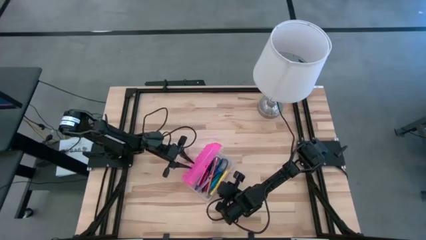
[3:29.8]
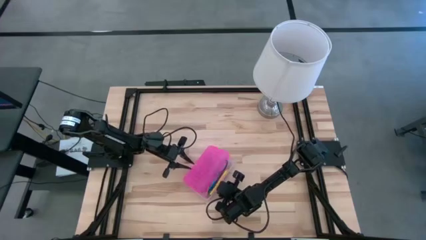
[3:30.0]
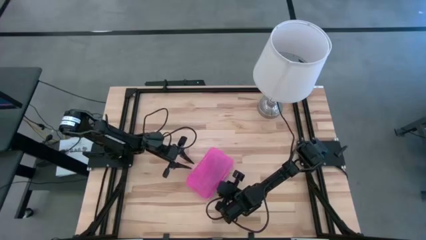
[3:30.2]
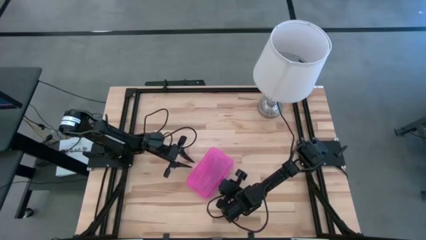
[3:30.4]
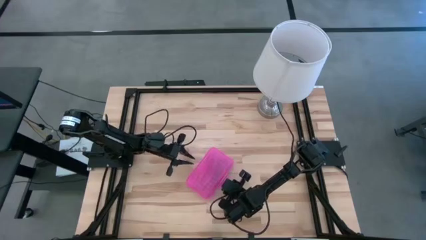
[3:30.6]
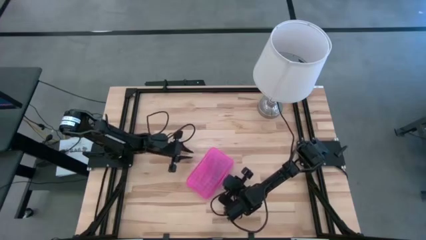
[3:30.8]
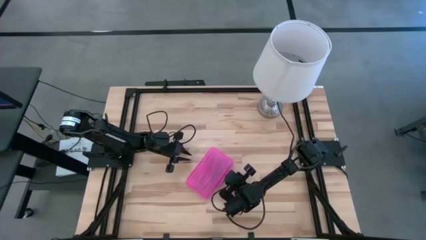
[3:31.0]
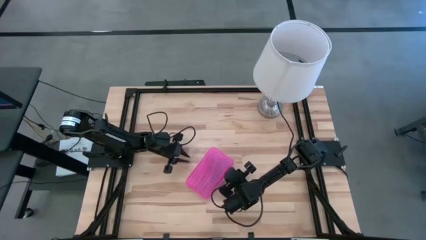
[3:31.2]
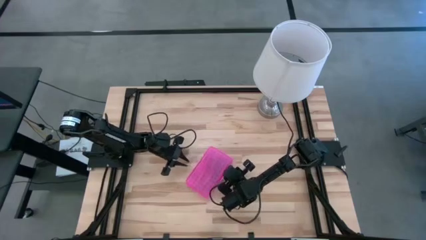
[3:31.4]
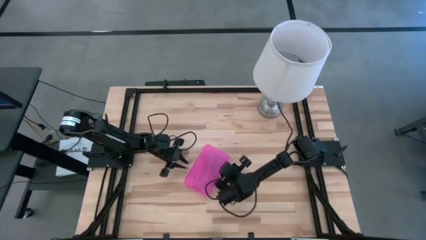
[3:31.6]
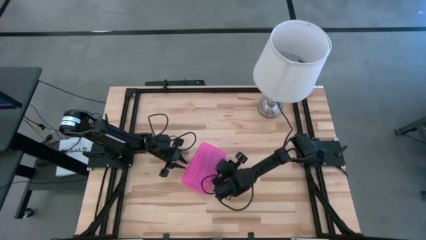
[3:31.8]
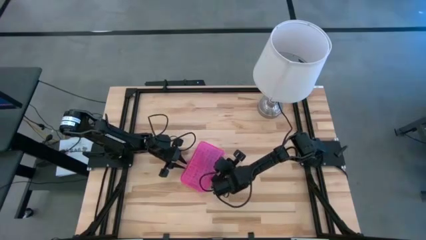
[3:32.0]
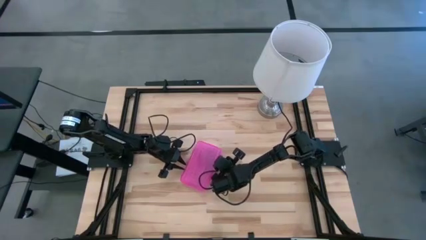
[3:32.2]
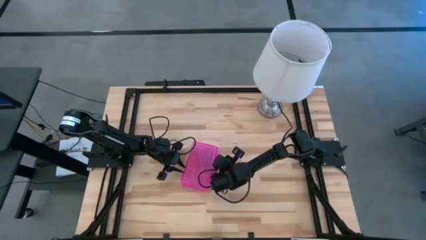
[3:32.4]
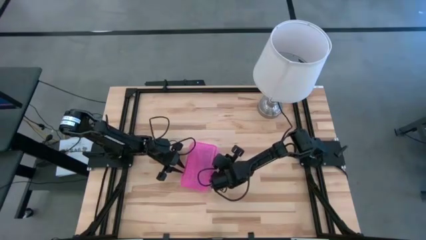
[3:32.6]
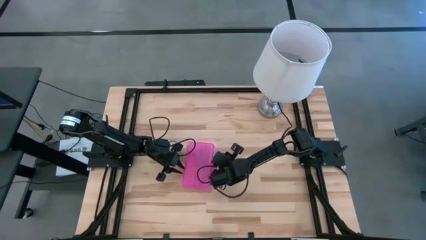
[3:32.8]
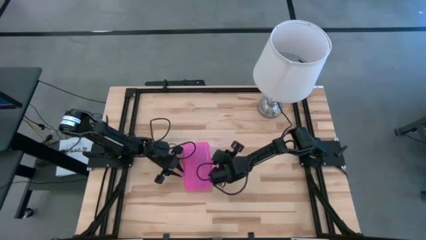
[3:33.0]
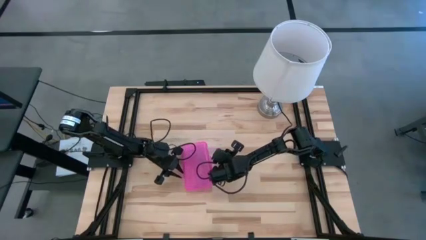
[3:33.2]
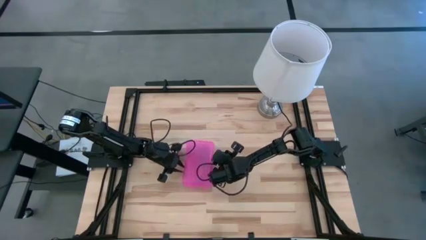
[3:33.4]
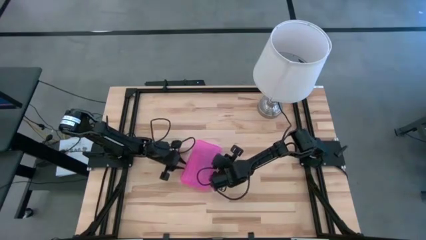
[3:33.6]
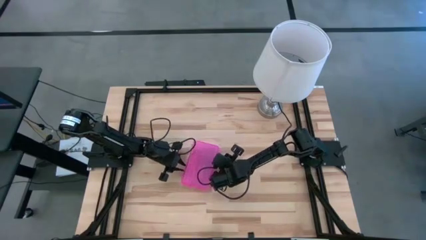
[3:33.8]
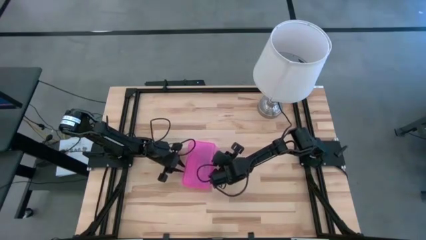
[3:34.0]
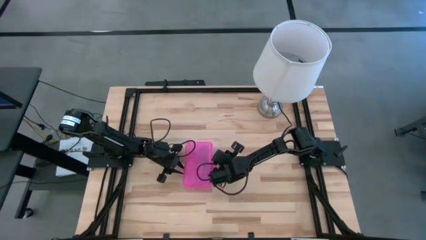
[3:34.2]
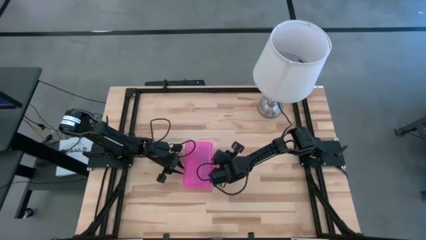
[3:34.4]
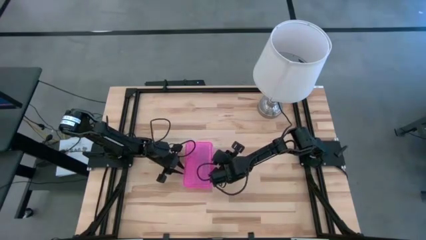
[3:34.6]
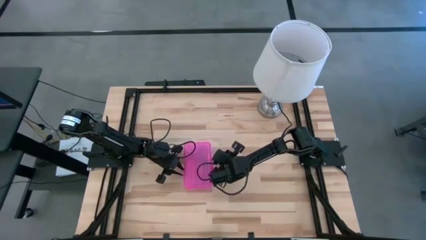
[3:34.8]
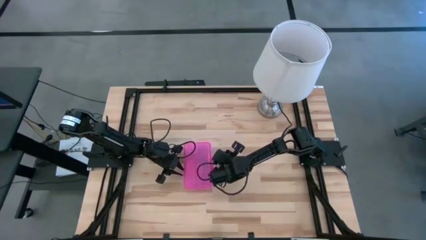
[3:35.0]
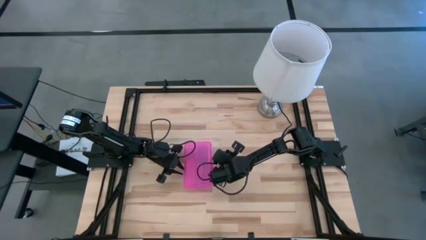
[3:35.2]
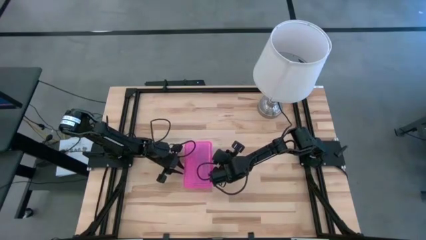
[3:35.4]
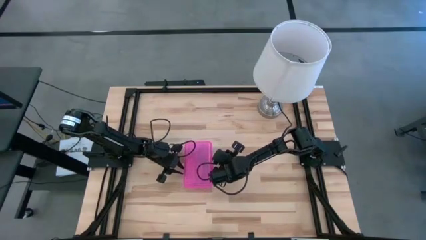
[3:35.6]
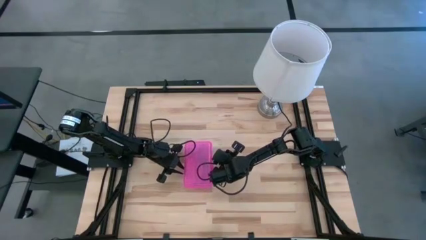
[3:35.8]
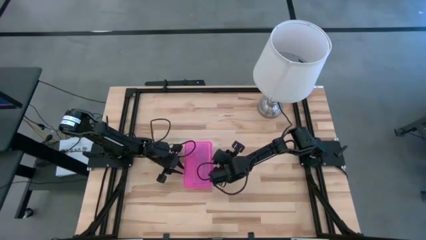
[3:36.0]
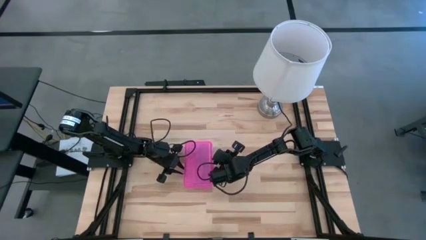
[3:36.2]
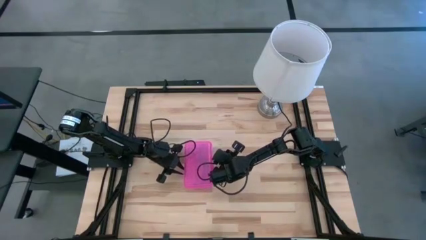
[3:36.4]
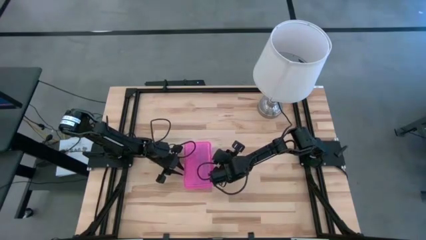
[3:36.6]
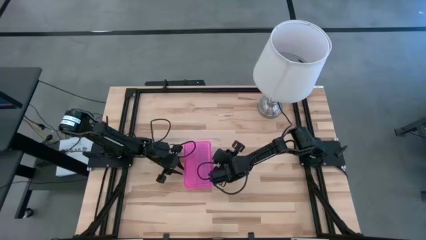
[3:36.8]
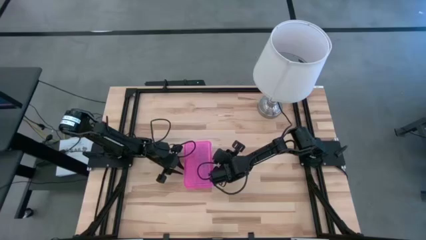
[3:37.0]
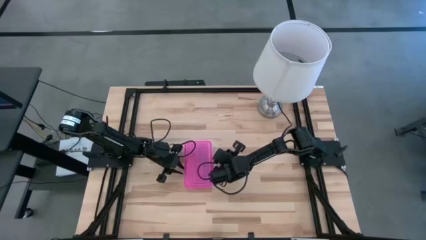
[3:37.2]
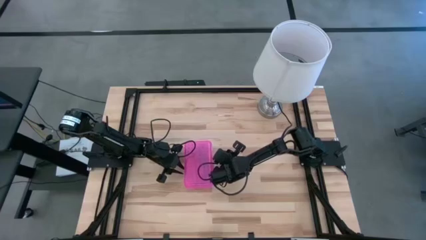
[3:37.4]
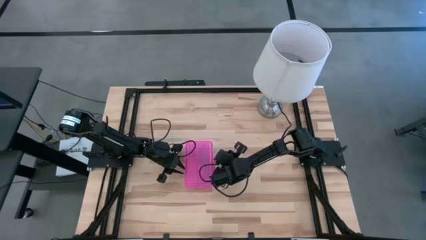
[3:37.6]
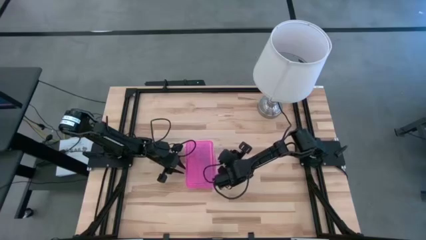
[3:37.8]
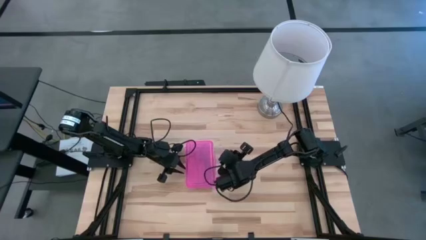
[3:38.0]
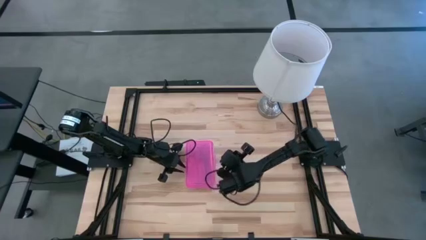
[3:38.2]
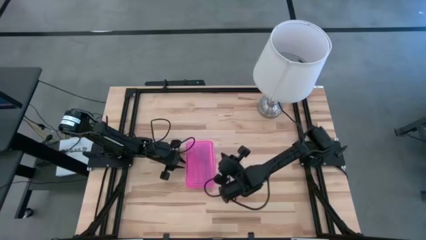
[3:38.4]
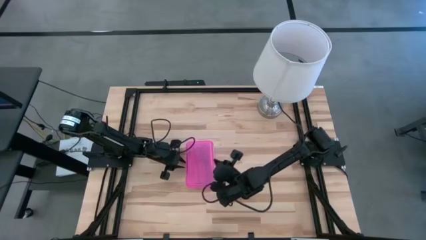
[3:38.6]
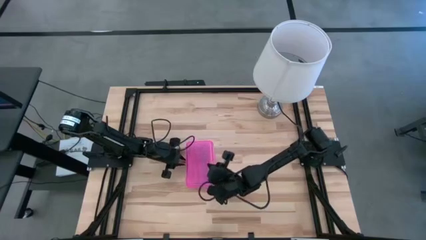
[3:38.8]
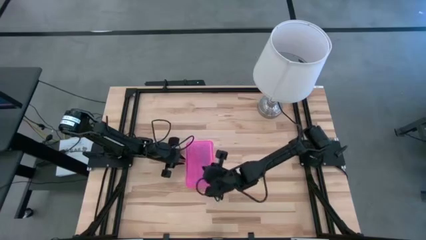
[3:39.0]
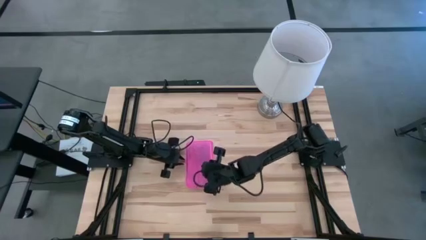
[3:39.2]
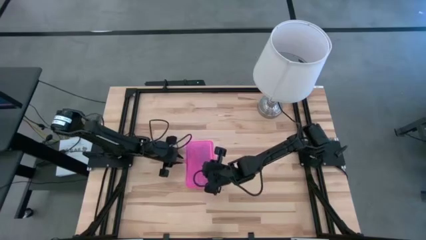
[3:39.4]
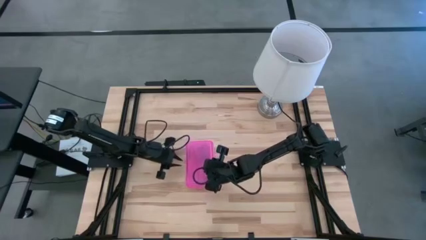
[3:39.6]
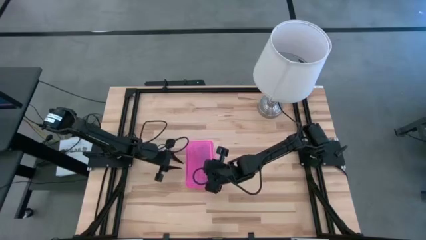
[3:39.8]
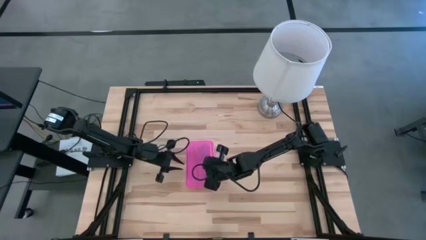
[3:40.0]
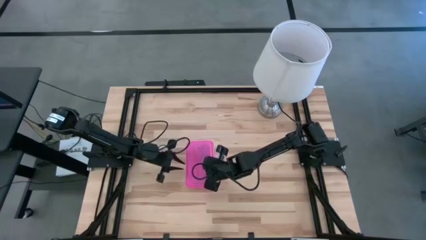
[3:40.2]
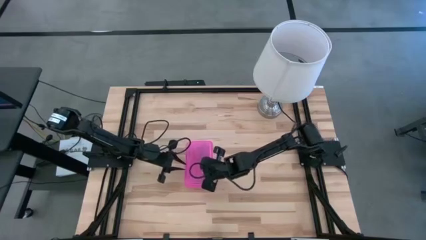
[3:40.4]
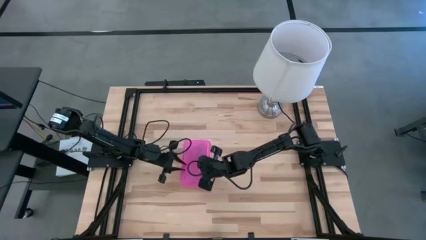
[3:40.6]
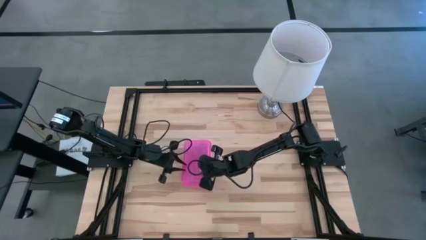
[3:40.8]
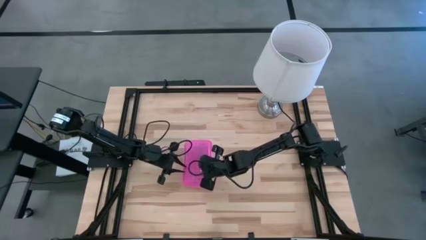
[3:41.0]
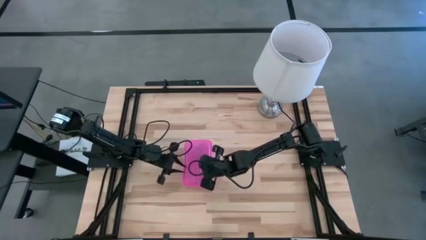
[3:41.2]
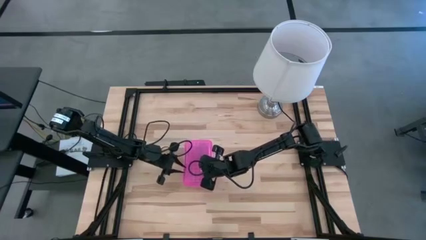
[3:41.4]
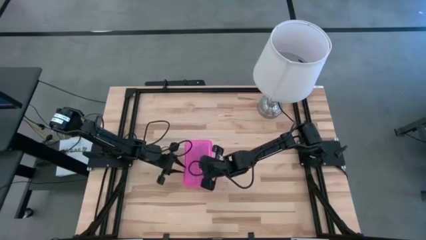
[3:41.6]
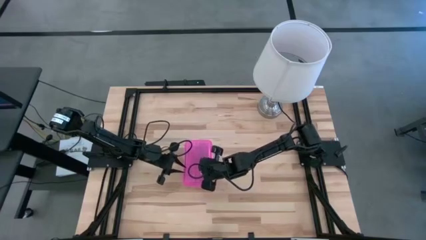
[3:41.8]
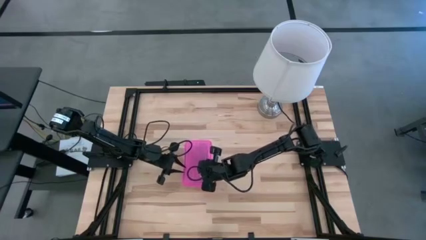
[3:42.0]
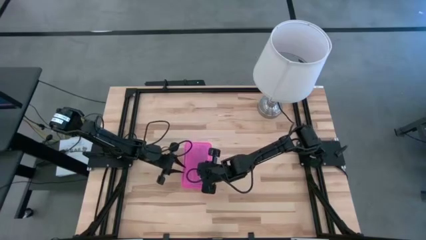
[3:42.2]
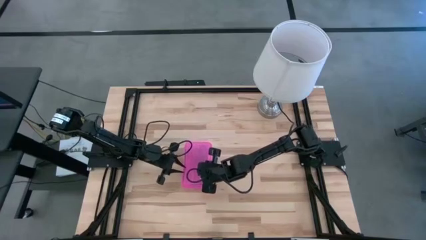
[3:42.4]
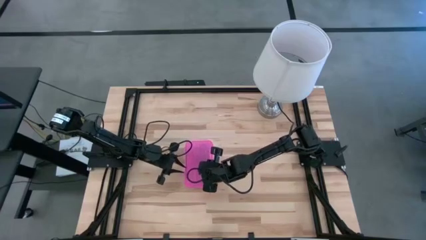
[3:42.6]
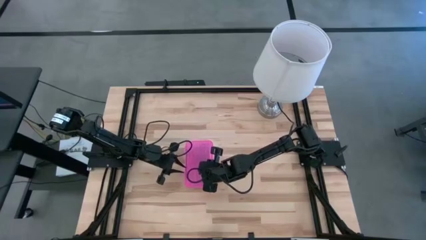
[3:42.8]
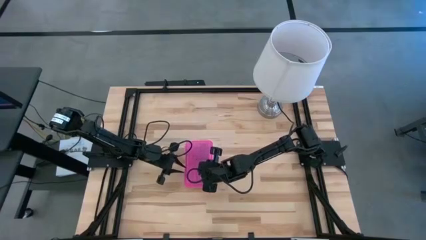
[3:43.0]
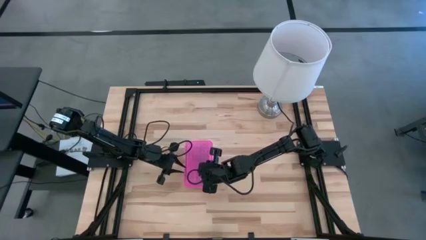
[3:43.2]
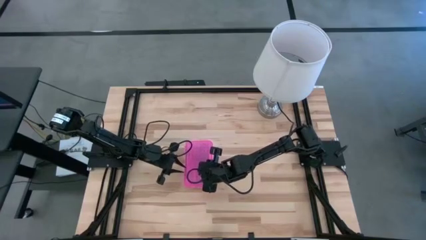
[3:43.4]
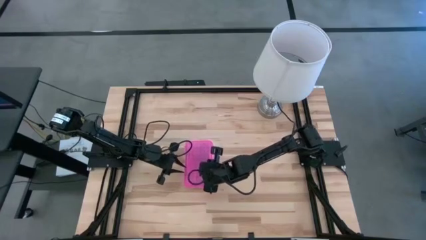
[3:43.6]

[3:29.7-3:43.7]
Task: Pick & place school supplies into a supply box
Close the pink supply box

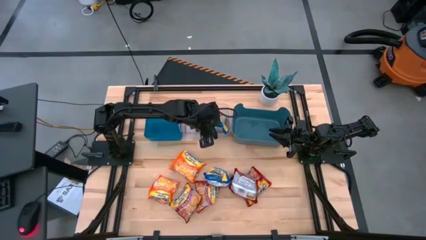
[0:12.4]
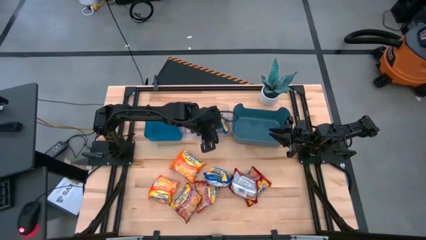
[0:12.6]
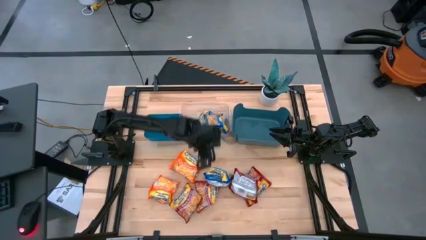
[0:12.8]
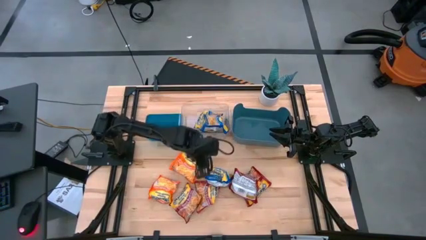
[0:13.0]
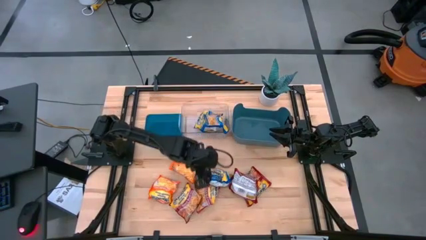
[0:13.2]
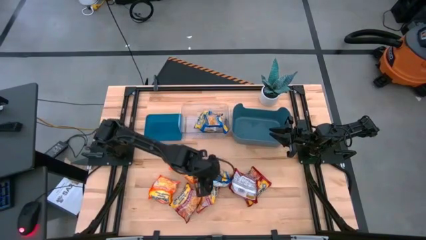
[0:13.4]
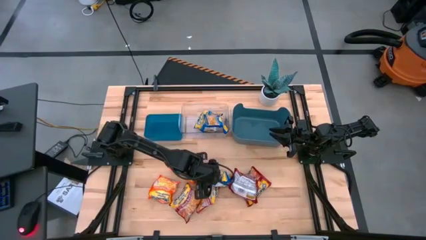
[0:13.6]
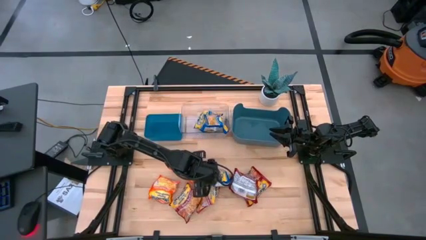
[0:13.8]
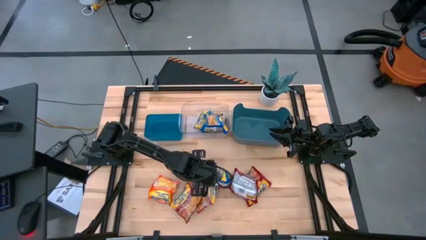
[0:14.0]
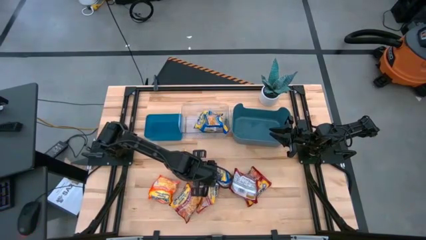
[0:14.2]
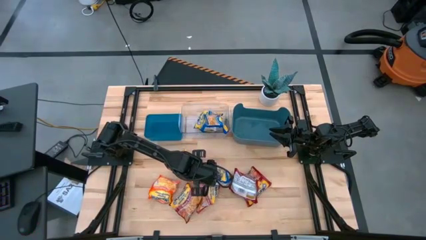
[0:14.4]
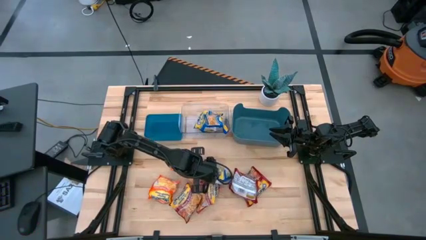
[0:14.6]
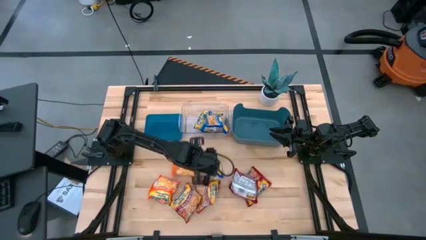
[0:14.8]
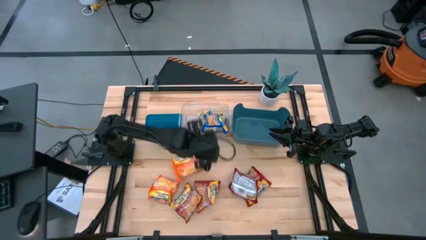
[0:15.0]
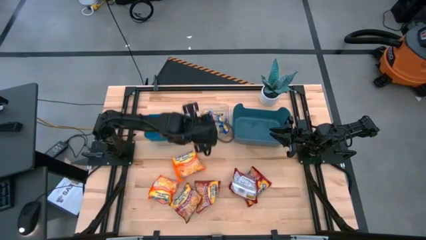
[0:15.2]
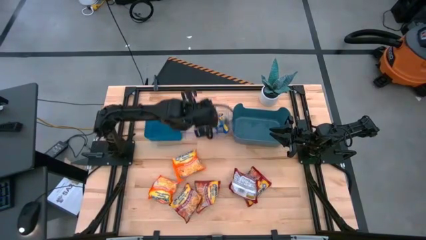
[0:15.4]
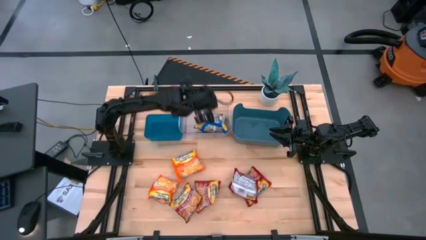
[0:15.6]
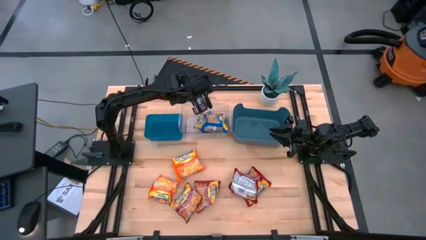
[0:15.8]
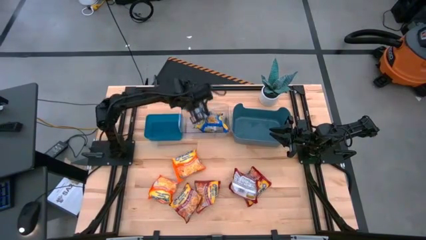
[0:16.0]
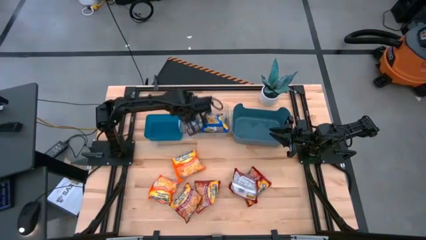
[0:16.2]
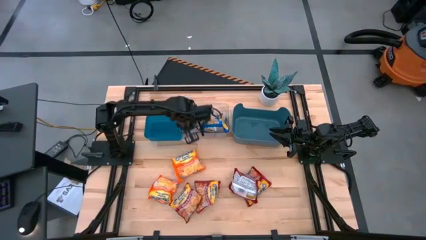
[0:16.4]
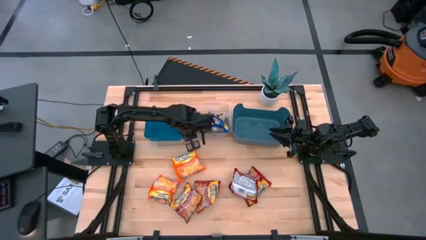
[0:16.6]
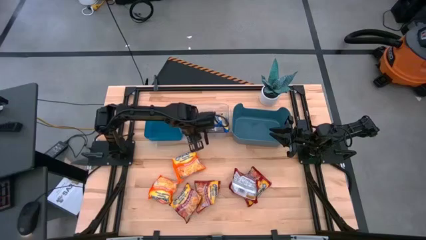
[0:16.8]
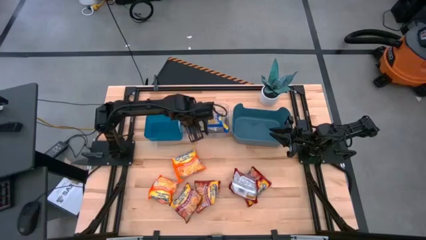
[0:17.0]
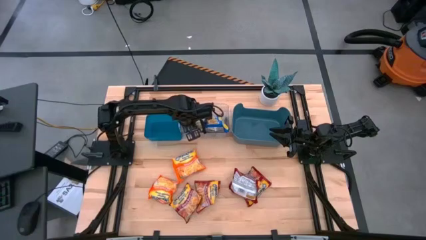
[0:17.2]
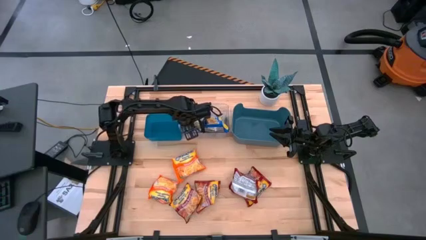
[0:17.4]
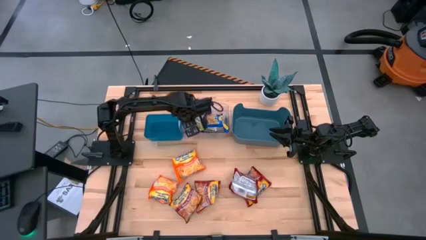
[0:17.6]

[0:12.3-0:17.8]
Task: Sort Maruchan noodles
Put the blue noodle pack into the transparent bin
